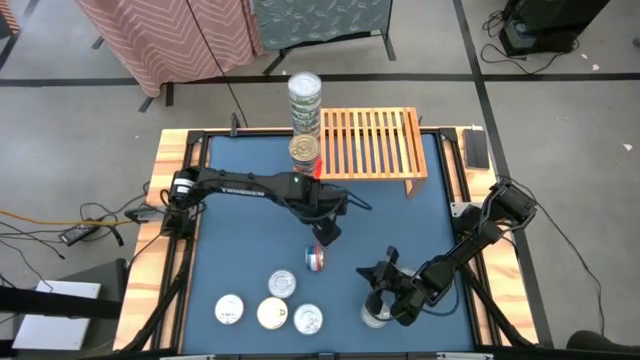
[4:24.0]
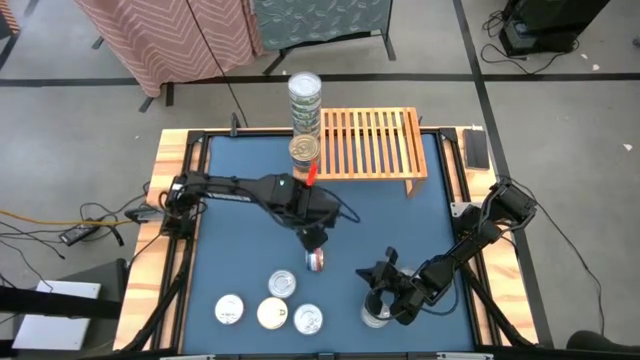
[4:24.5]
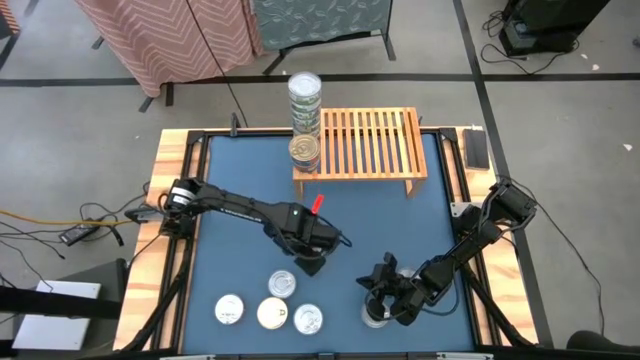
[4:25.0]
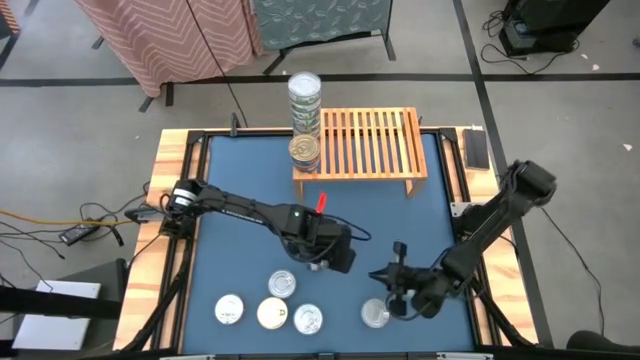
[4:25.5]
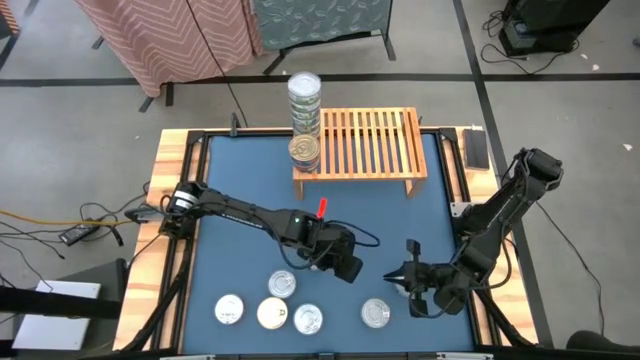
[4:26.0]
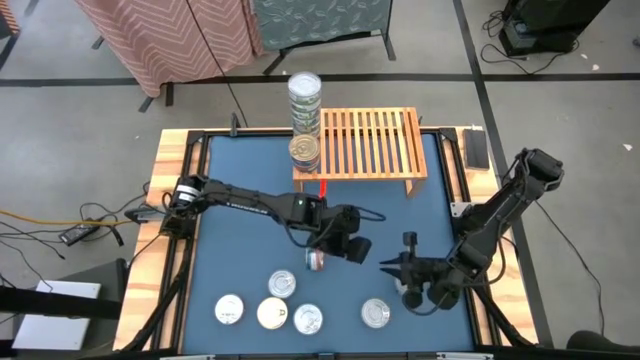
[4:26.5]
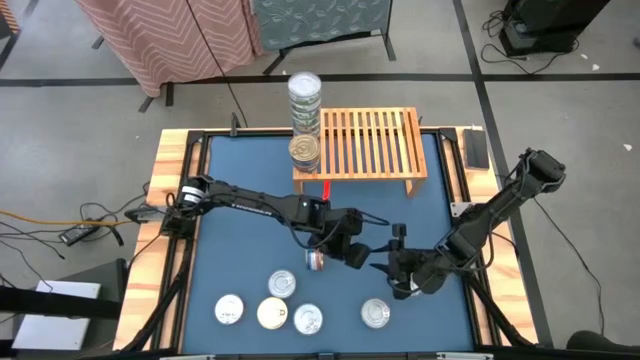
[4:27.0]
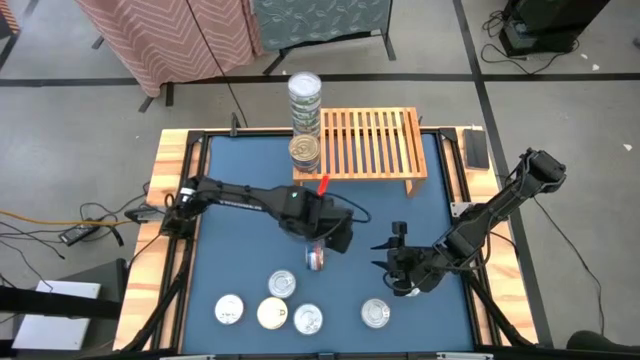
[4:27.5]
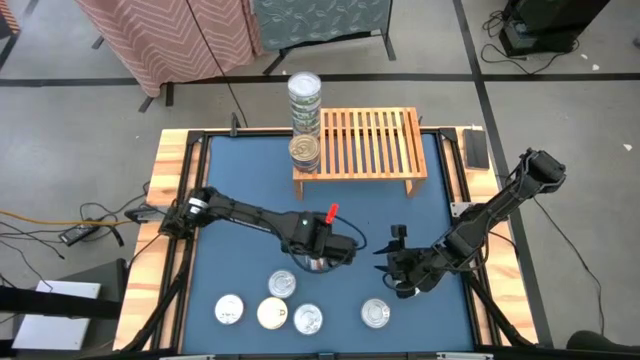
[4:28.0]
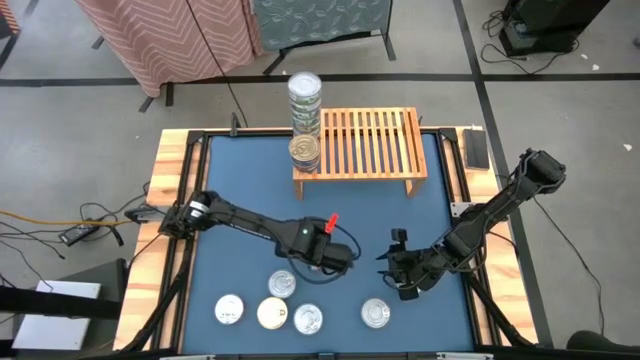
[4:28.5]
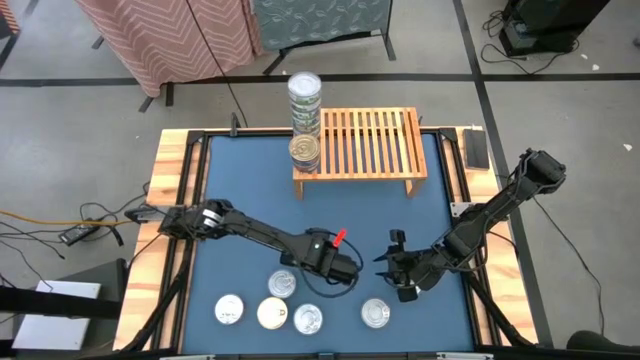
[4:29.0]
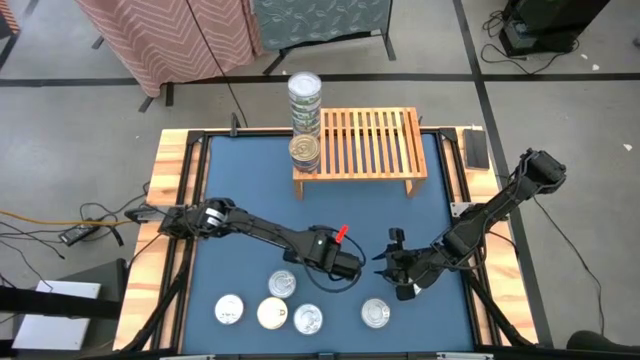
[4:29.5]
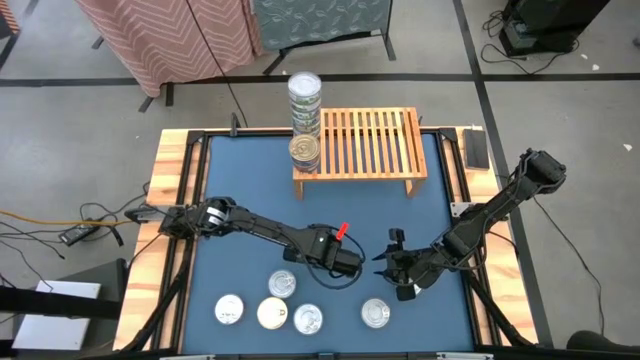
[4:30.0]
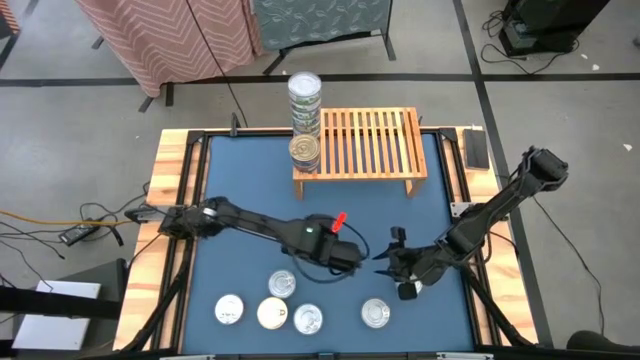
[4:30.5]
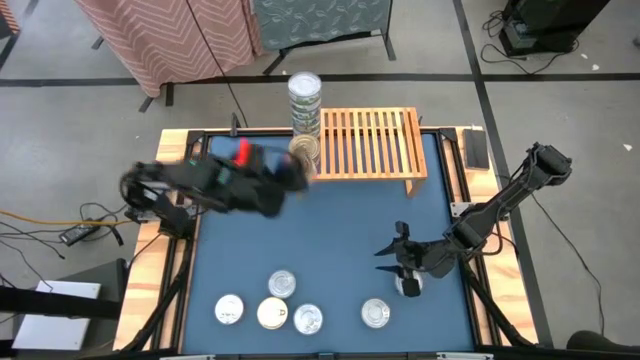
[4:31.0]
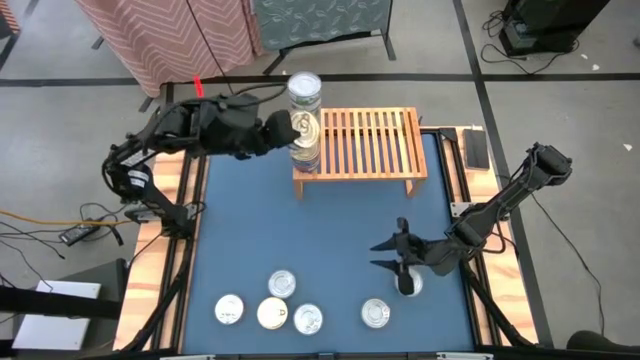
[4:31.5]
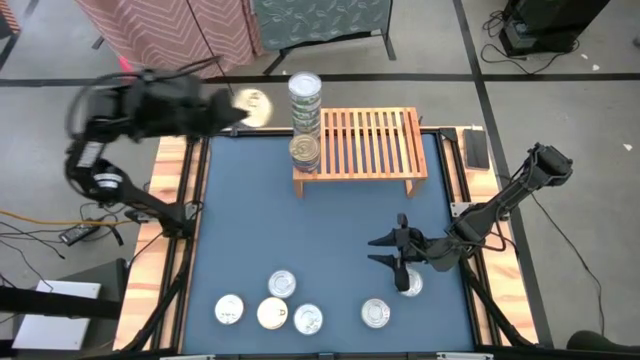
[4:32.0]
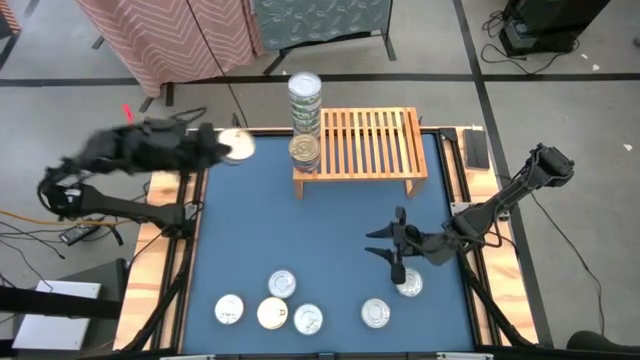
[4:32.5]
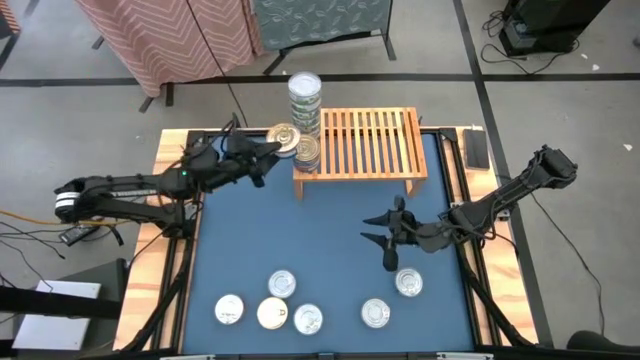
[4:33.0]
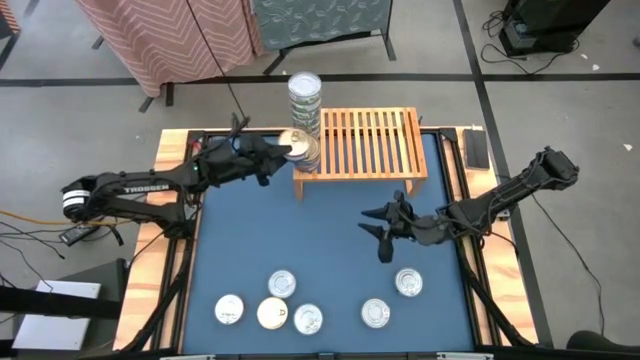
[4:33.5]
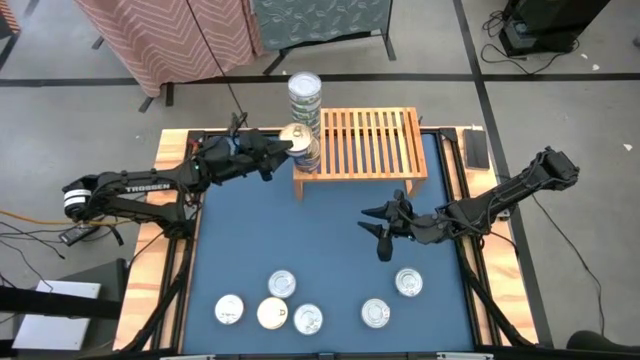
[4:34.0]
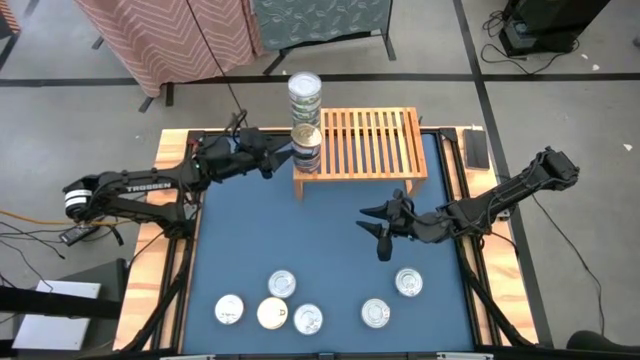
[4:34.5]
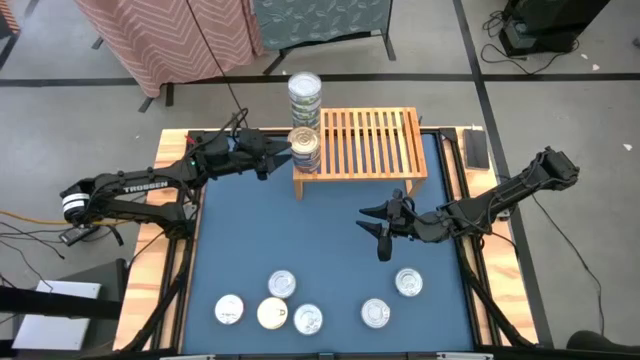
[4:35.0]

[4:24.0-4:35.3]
Task: Stack canned seafood by type on shelf
Stack the blue tuna can on top of the other blue tuna cans on the shelf

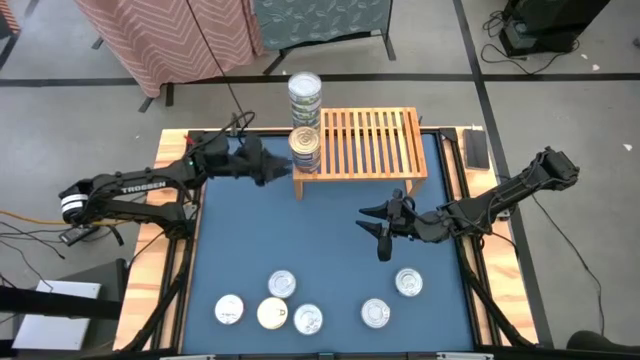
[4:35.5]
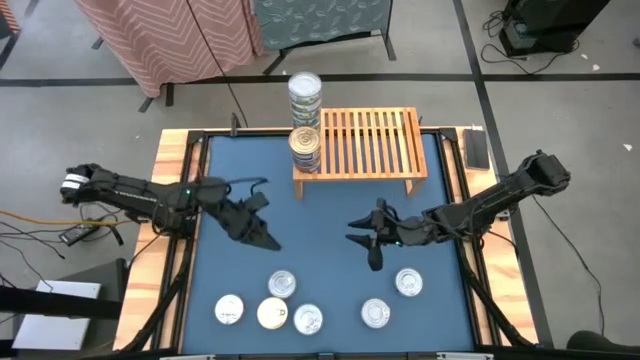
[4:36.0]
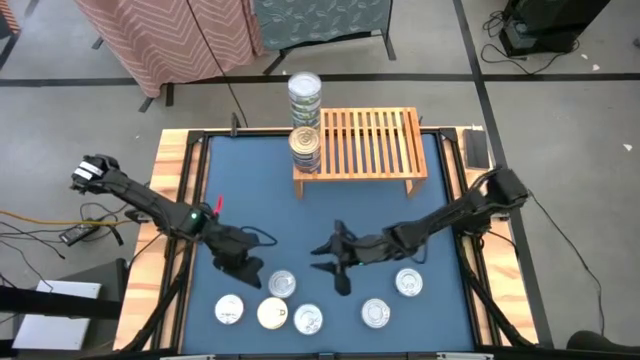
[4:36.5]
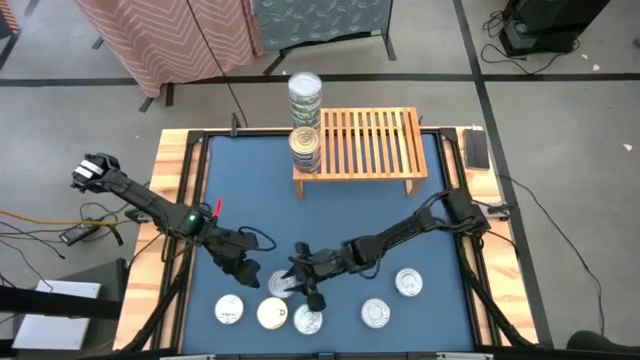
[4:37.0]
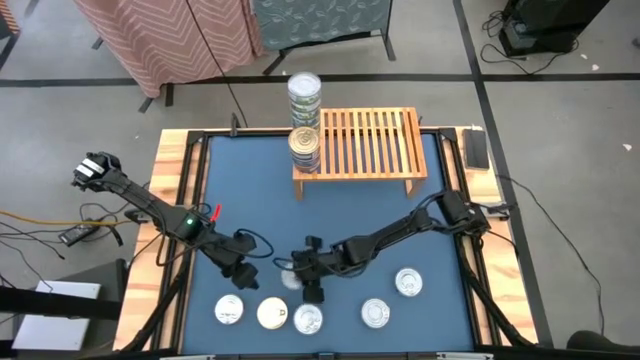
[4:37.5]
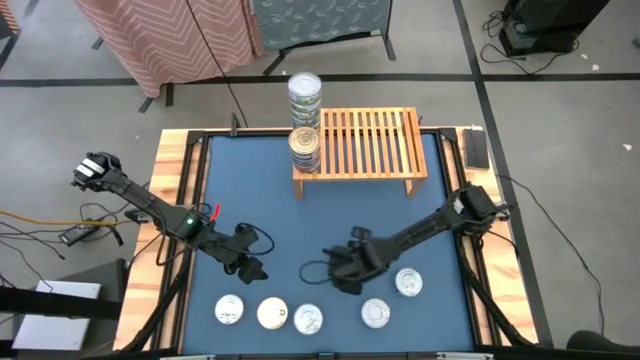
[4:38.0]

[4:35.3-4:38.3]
Move the dark green tuna can to the middle right of the table

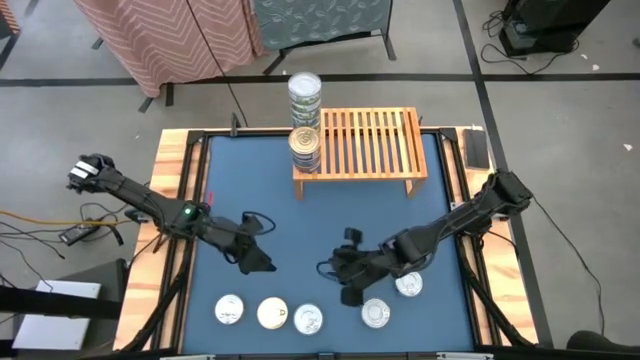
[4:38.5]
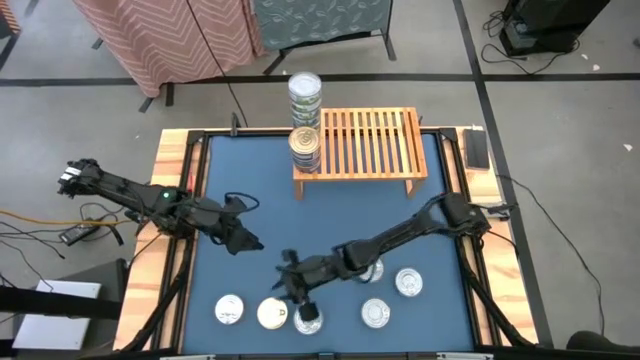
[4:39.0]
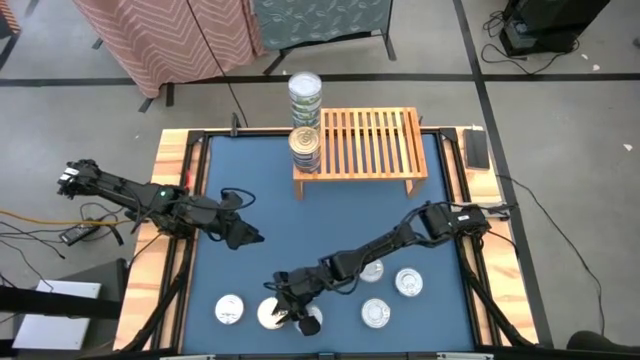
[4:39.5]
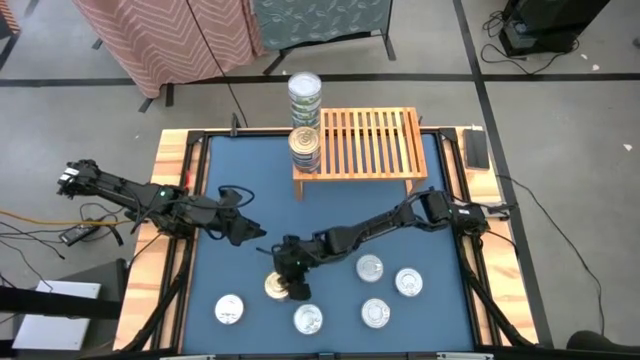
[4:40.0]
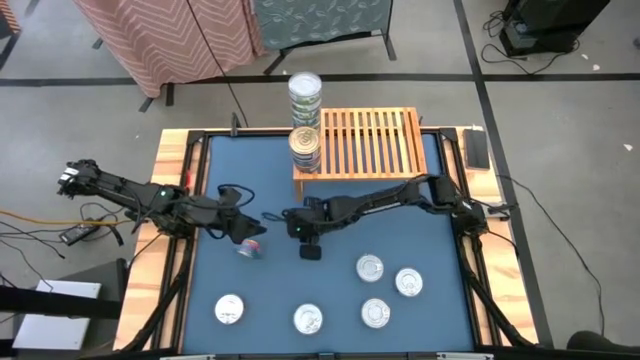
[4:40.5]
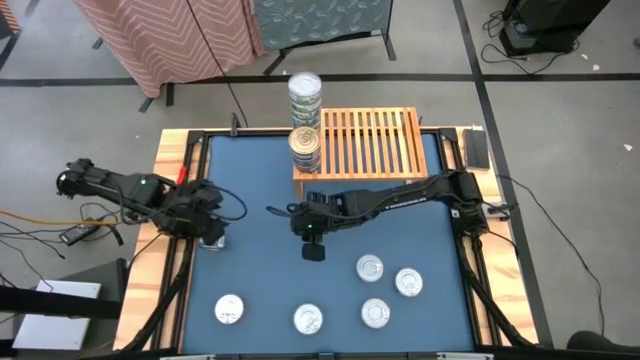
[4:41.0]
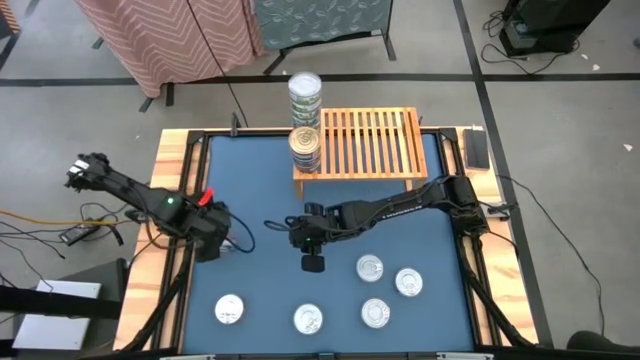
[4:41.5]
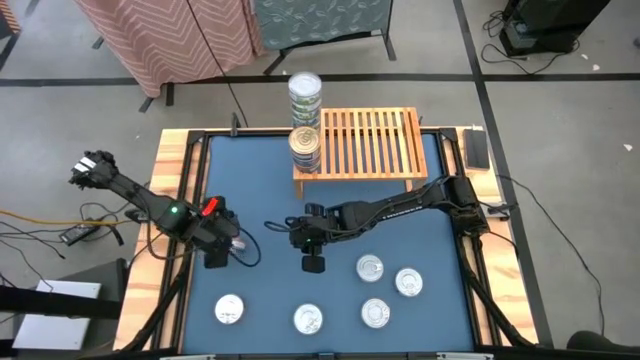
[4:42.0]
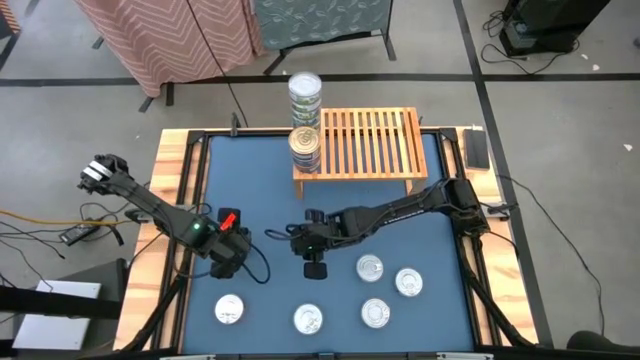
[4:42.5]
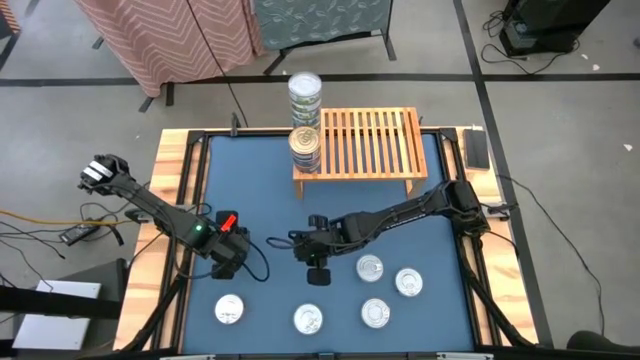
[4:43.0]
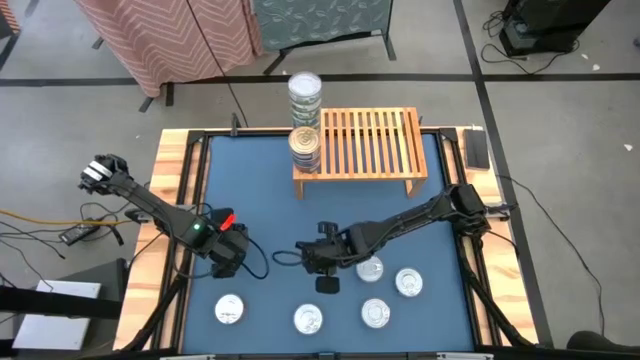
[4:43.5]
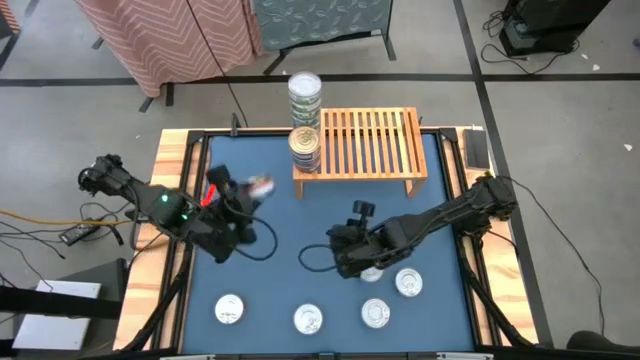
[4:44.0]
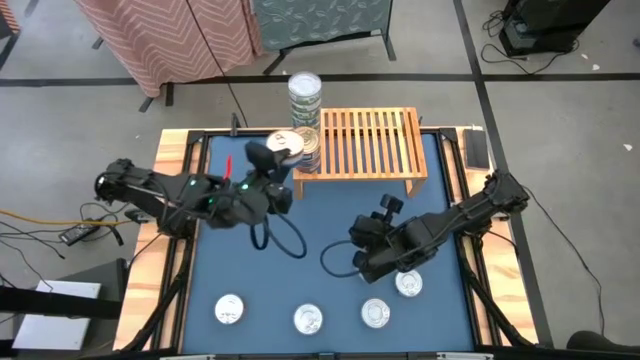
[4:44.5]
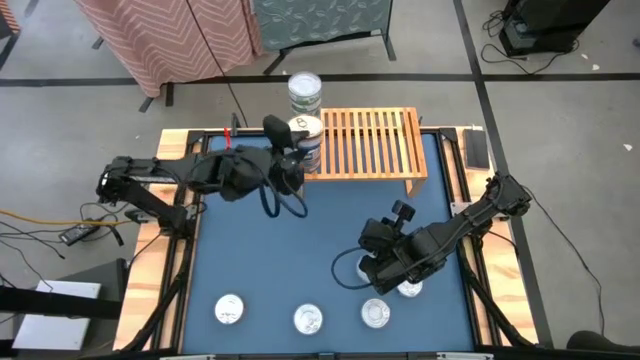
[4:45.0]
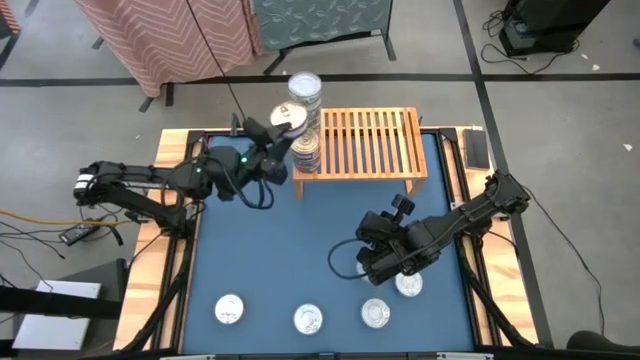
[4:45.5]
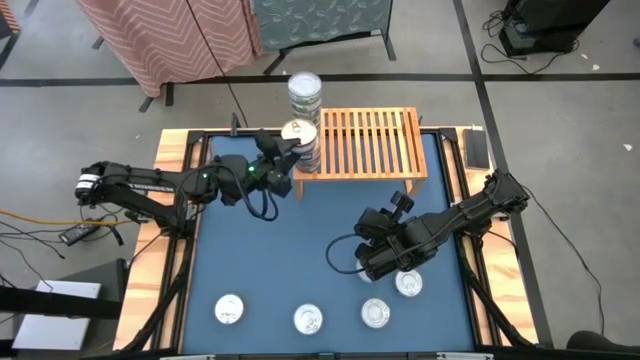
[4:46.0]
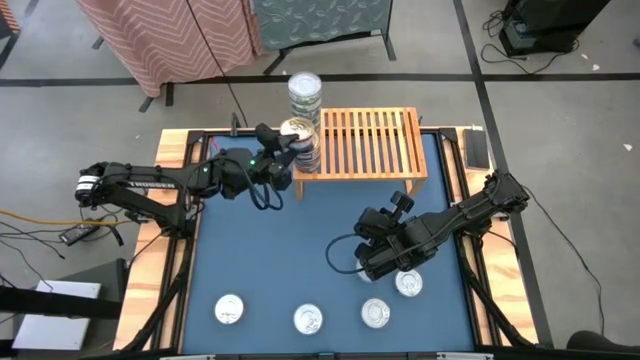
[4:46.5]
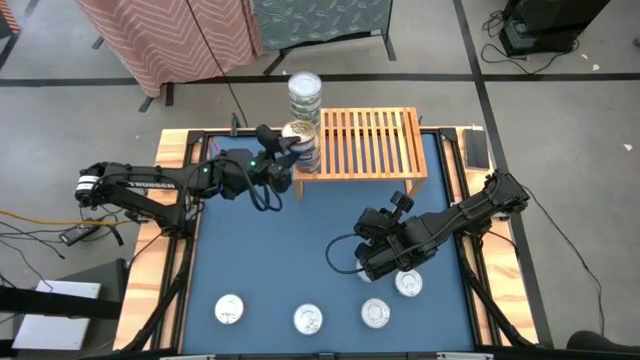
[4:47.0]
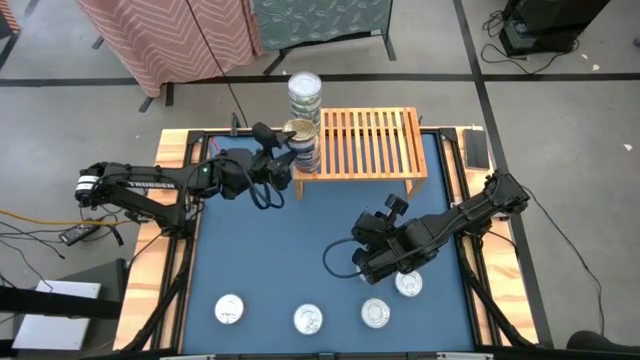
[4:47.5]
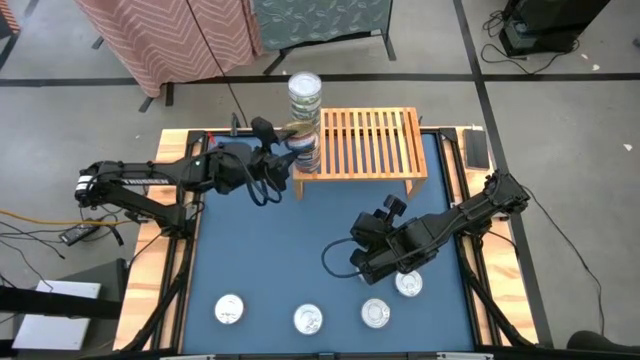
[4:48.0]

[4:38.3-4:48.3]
Stack the blue tuna can on top of the other blue tuna cans on the shelf
